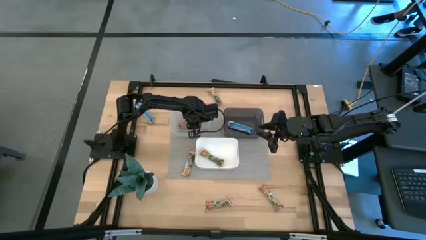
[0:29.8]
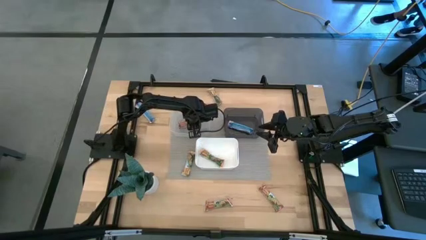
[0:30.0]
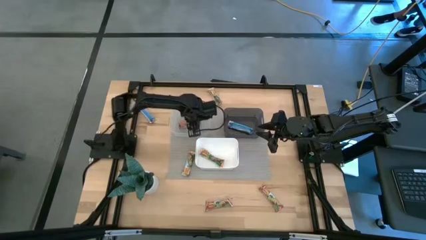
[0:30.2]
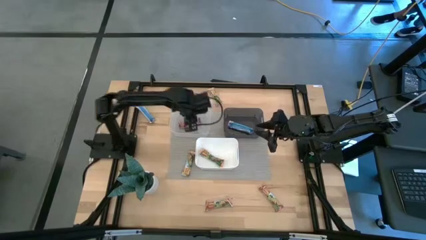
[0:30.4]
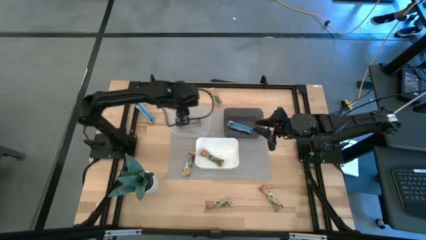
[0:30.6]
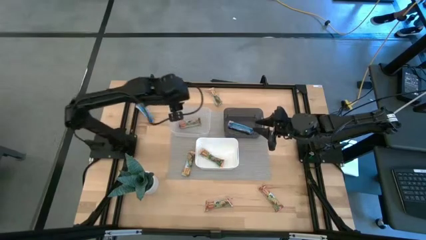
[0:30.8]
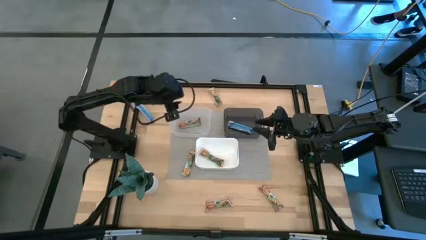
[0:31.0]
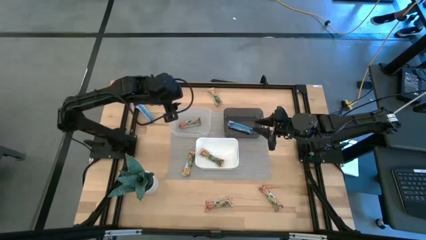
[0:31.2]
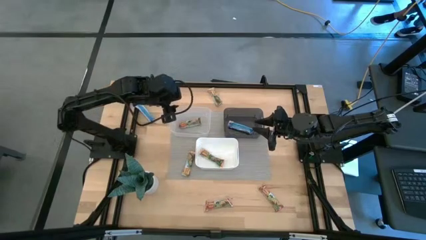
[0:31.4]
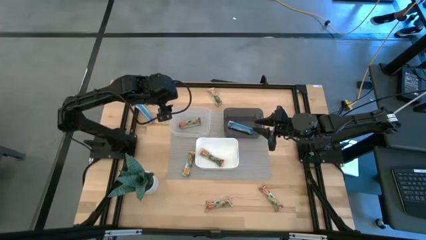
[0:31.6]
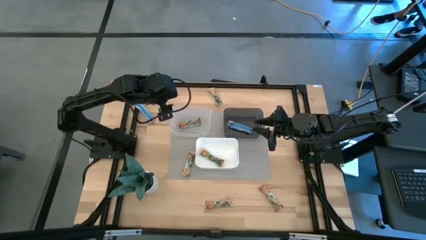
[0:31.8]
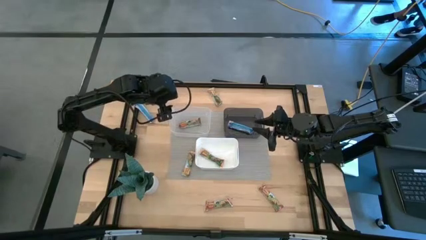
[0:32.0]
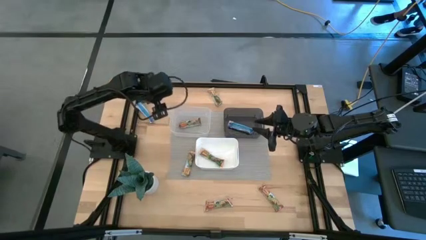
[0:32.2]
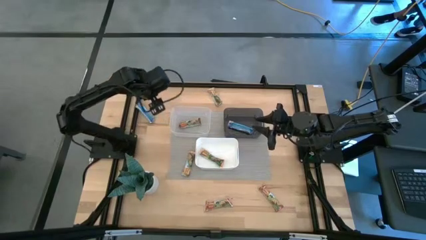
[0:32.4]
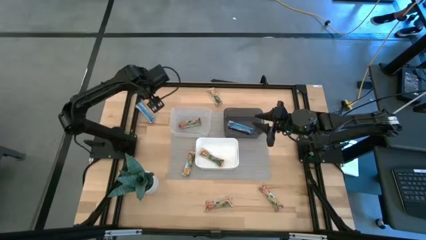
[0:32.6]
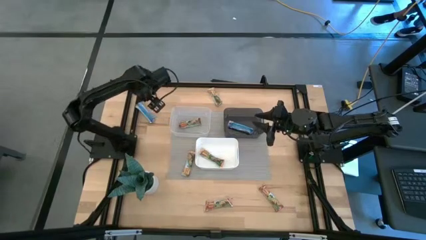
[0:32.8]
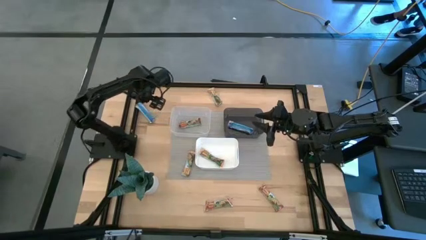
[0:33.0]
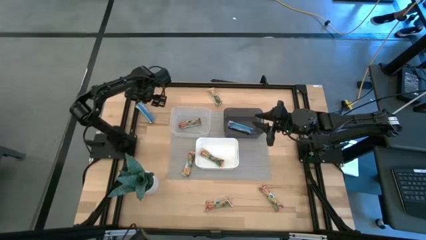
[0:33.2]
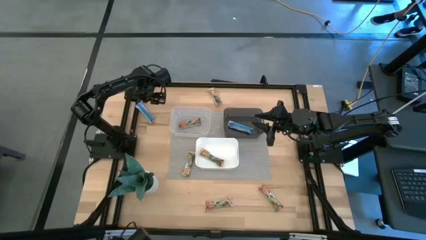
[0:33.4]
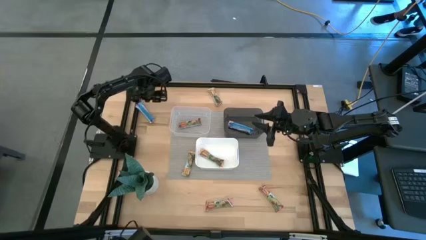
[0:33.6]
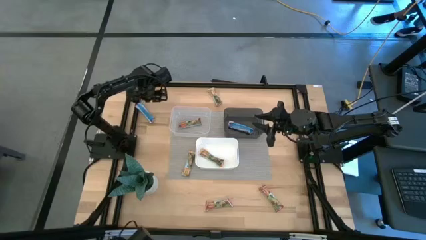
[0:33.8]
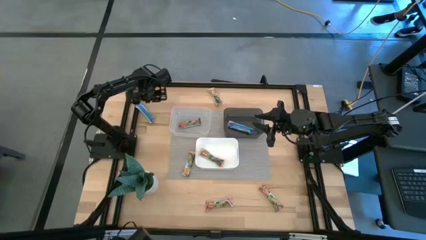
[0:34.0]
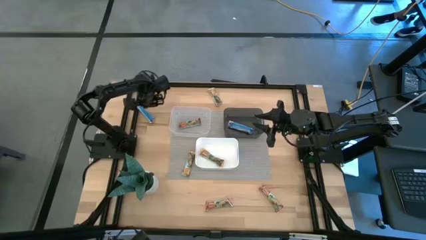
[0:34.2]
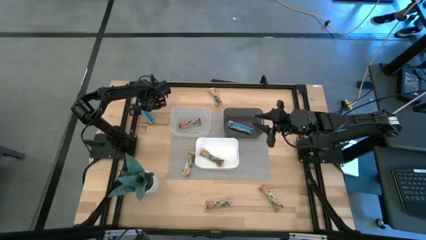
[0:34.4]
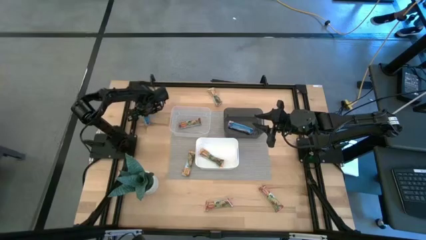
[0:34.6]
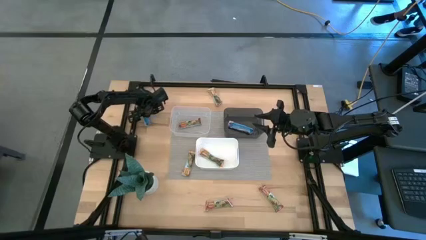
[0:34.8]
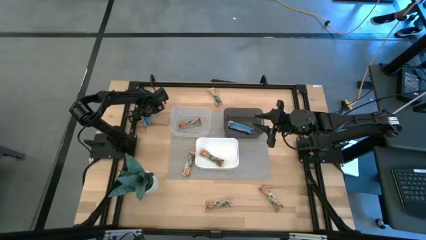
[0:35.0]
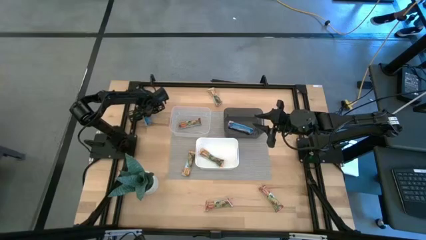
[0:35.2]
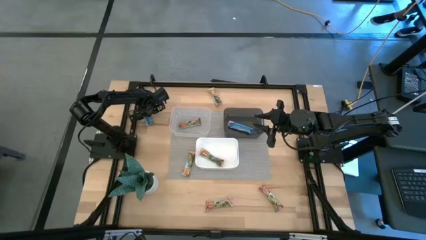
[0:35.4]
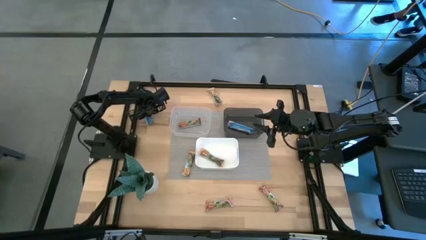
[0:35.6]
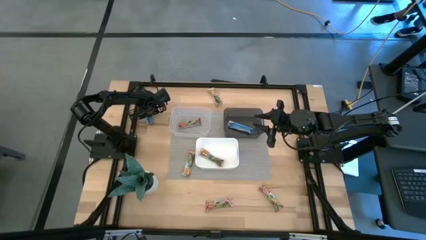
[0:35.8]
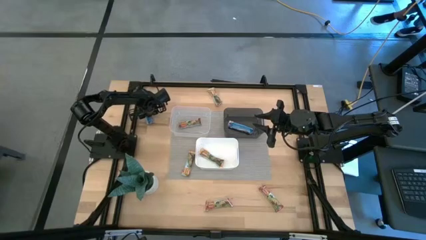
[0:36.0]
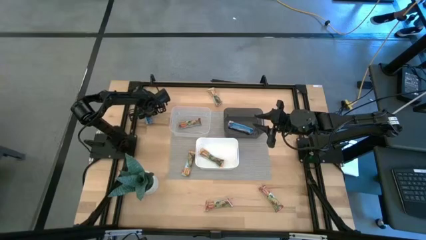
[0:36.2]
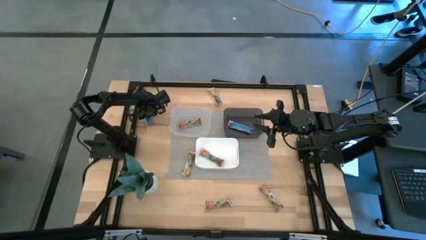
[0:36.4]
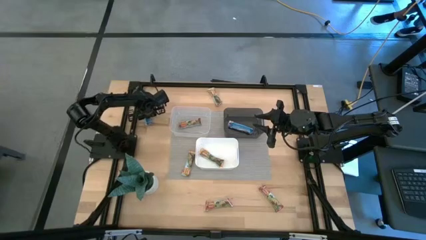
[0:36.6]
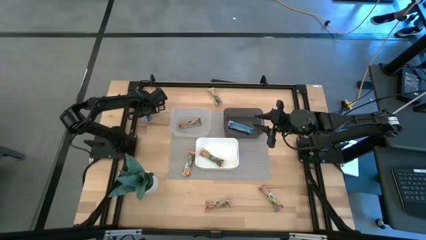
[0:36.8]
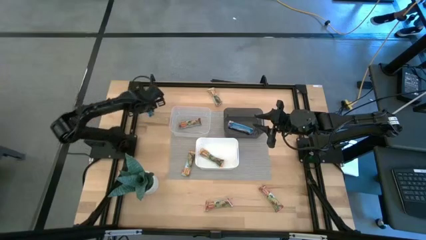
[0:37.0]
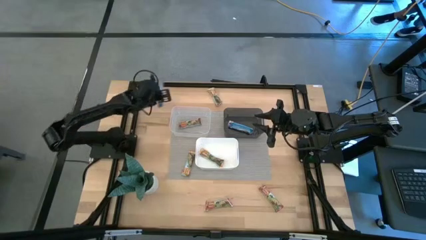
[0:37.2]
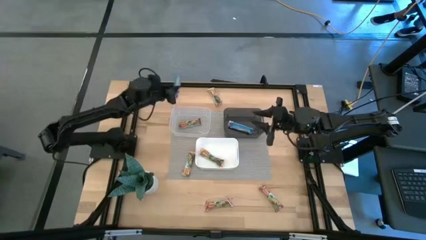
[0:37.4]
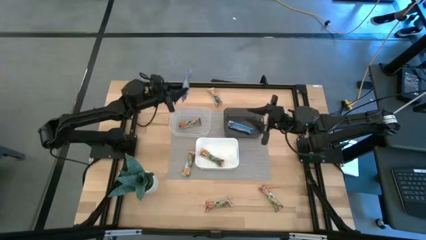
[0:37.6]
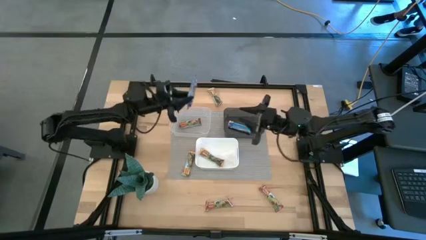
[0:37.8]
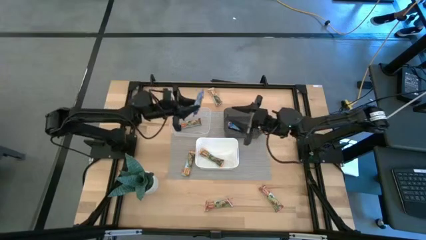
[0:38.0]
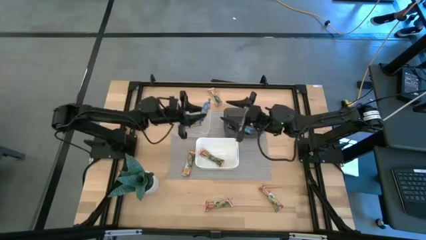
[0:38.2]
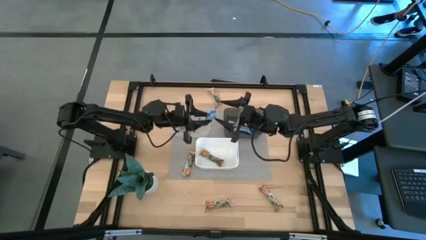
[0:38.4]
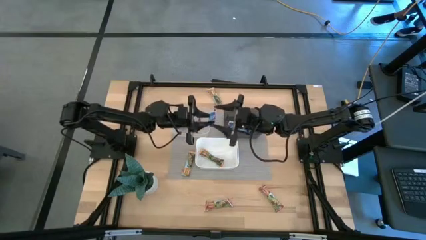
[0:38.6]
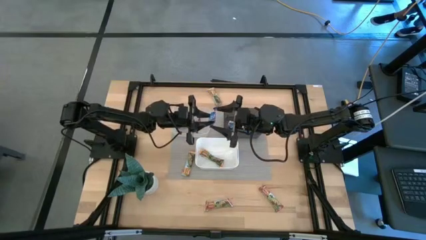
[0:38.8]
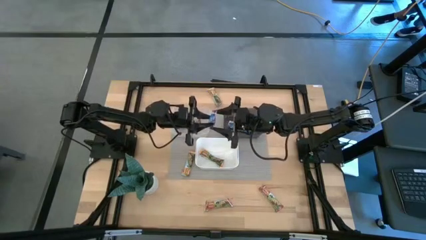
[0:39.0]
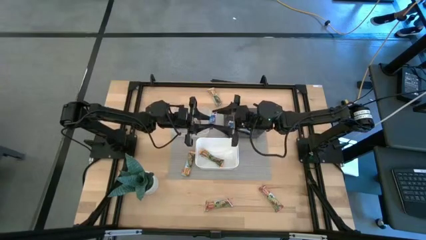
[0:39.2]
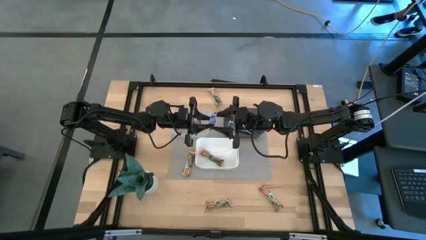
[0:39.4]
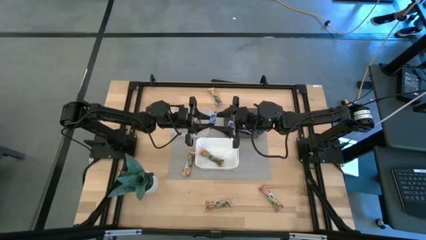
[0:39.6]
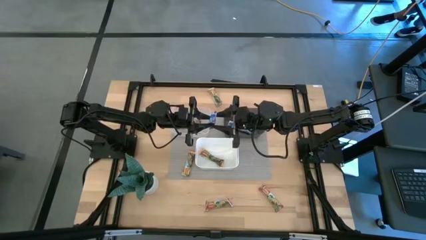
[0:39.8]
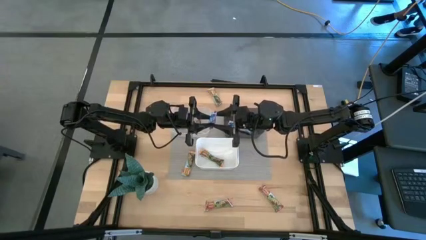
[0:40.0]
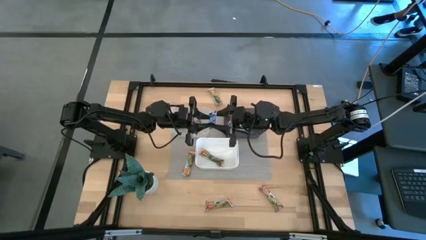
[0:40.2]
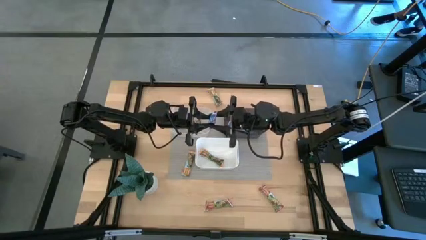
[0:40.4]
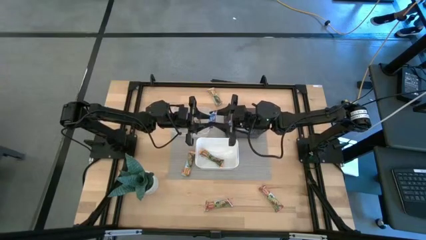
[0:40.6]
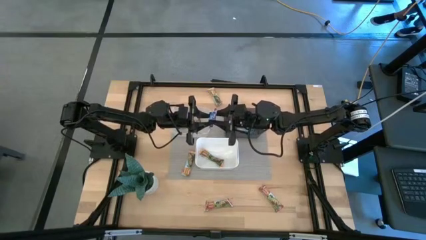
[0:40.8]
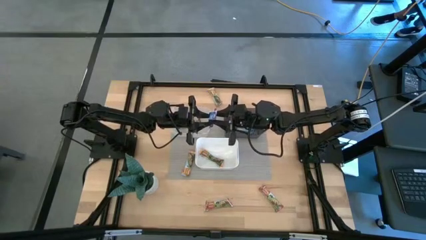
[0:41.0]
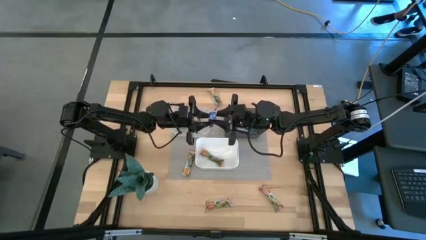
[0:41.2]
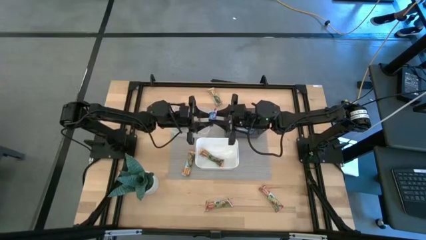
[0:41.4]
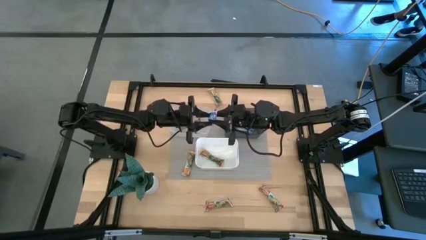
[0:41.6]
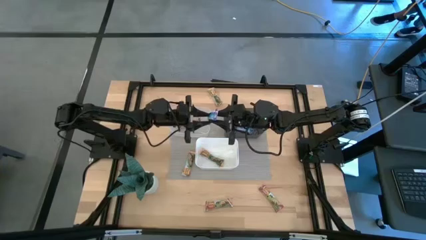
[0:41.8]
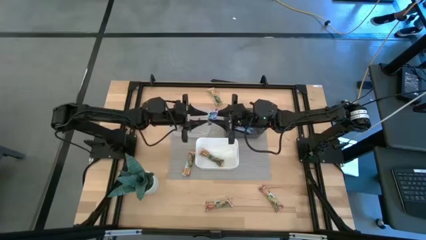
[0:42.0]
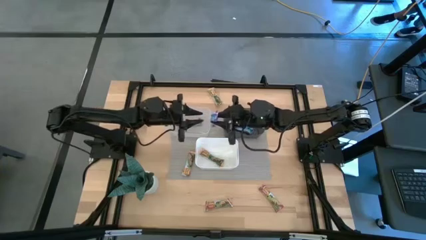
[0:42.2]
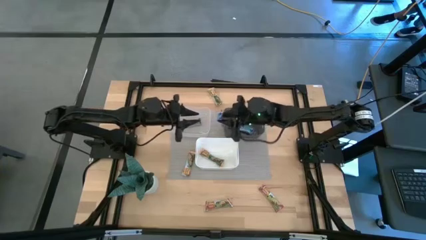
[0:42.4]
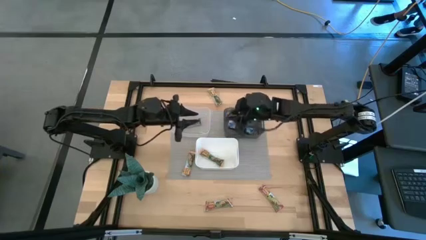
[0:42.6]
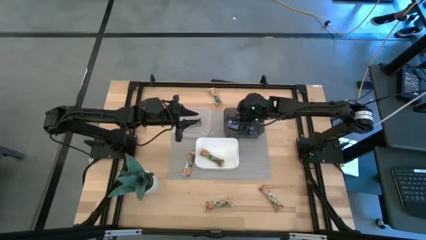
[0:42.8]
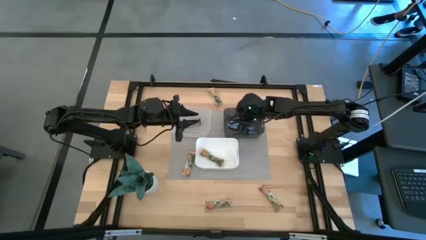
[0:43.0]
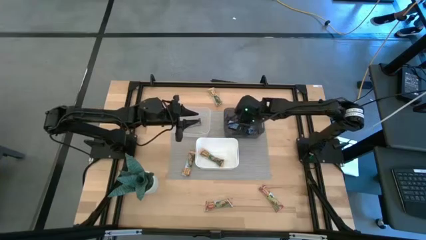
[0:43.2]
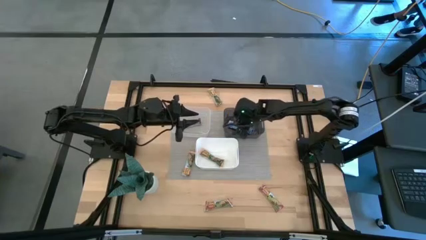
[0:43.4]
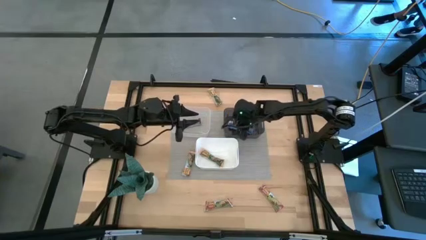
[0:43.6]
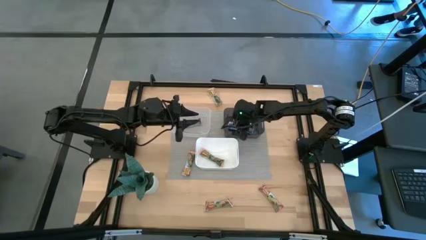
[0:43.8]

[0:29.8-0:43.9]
Task: Pick and place Granola Bars by type
Put the blue granola bar into the black bin
